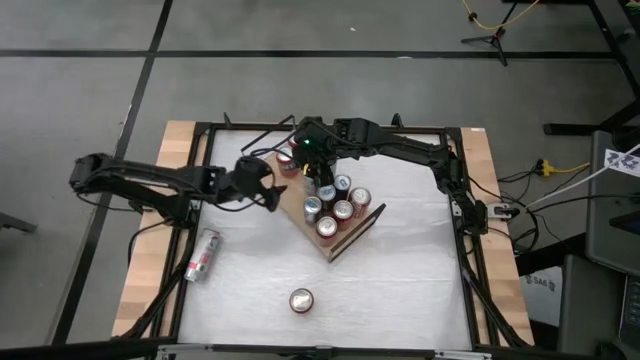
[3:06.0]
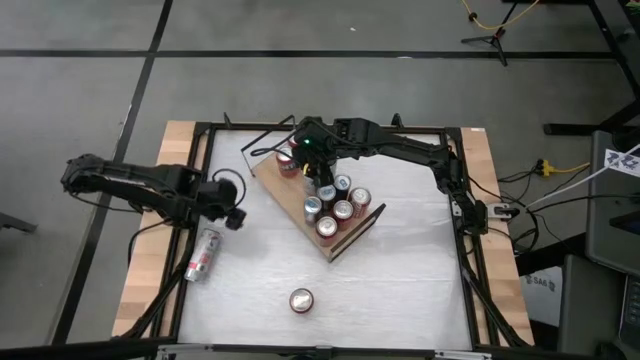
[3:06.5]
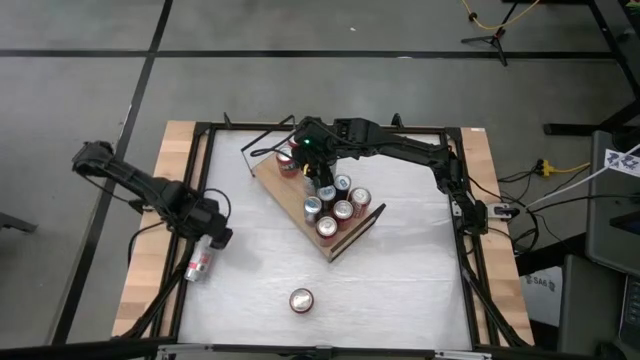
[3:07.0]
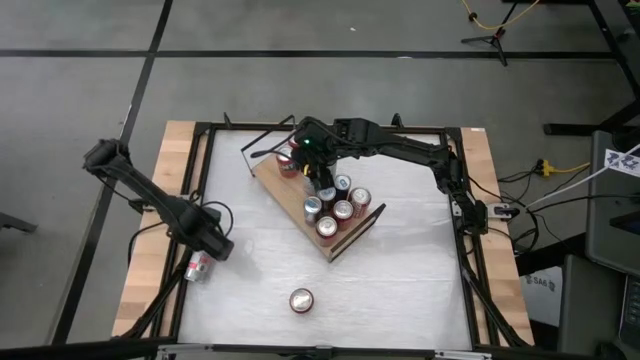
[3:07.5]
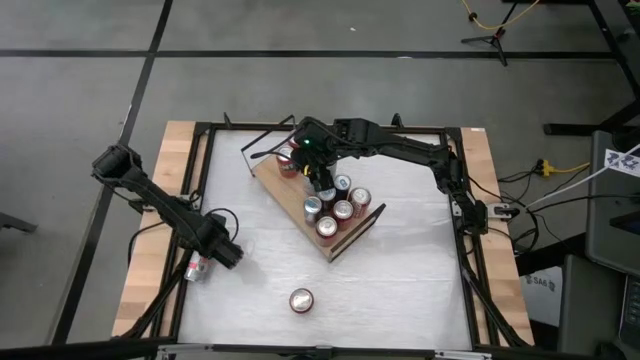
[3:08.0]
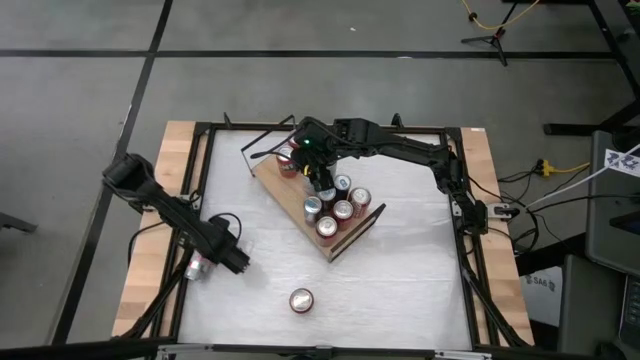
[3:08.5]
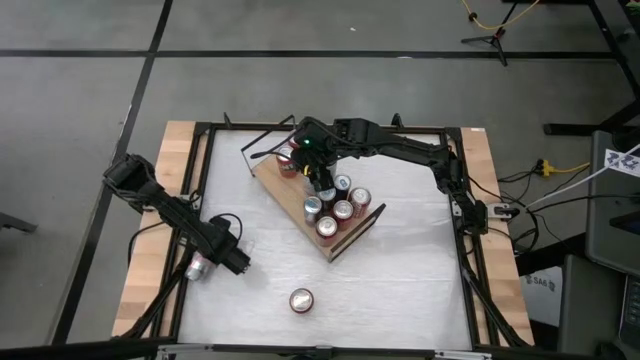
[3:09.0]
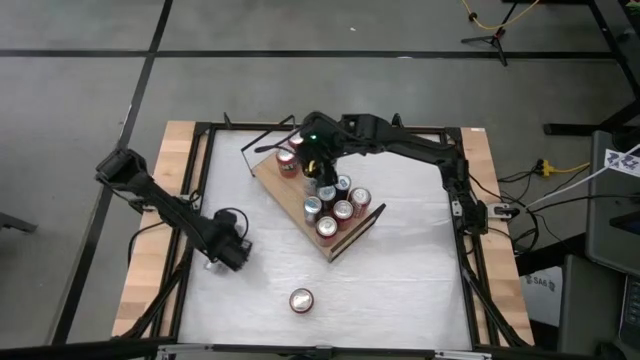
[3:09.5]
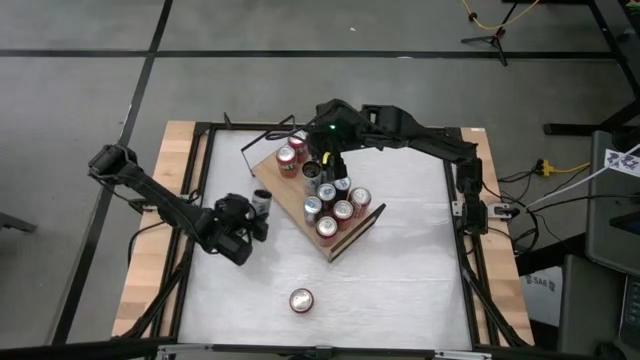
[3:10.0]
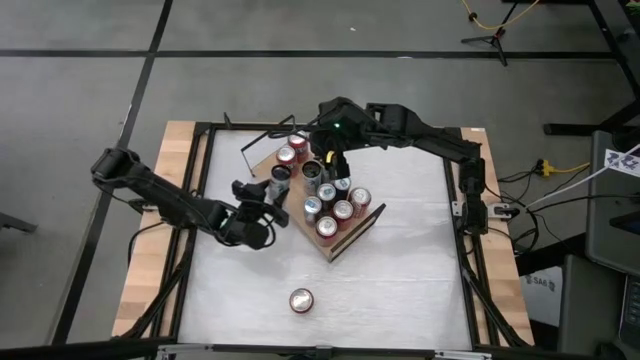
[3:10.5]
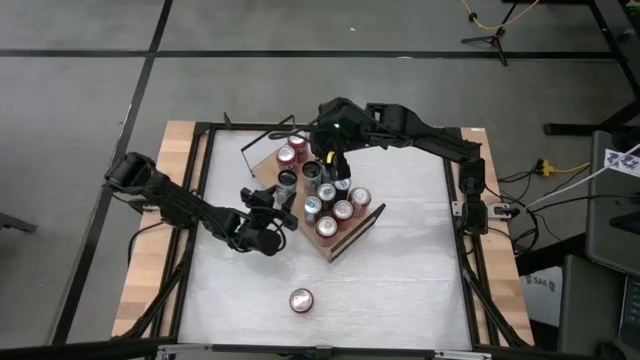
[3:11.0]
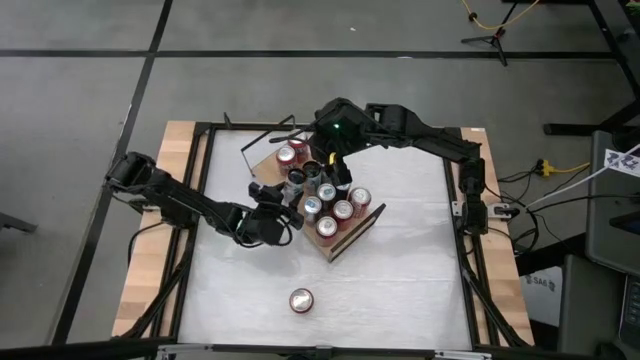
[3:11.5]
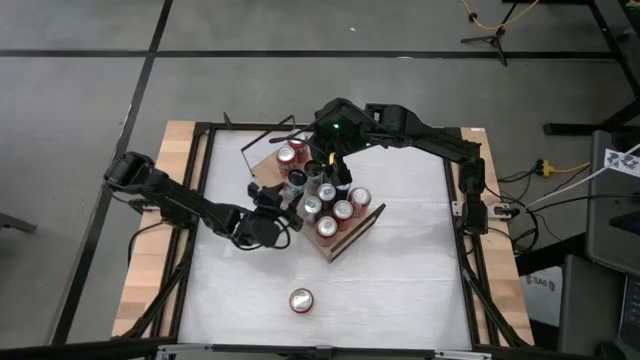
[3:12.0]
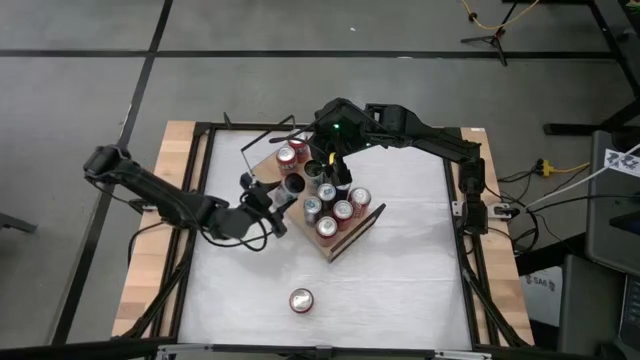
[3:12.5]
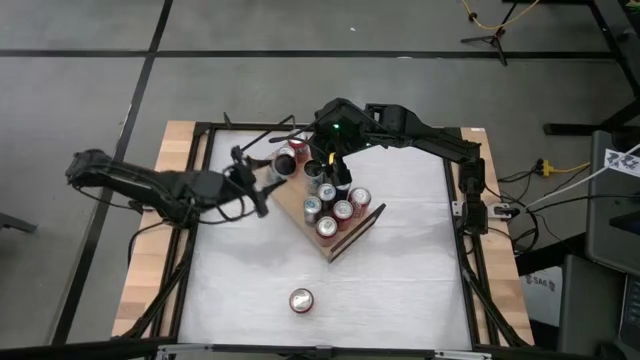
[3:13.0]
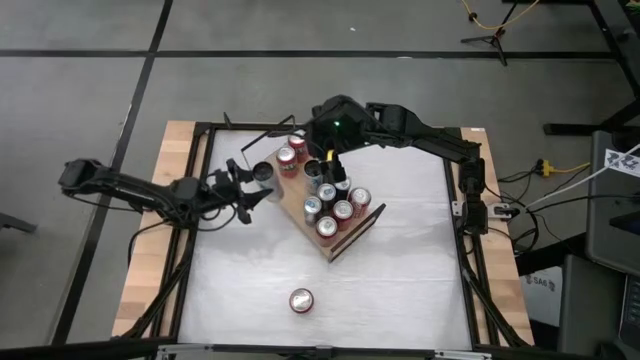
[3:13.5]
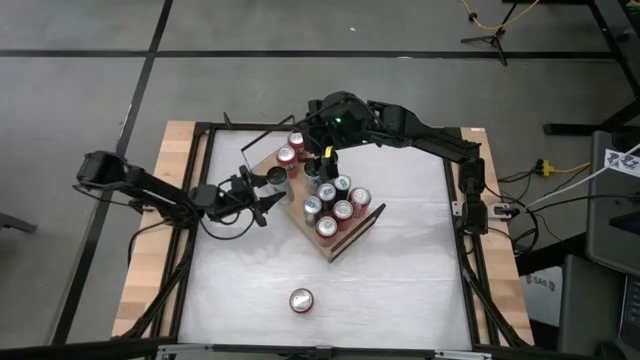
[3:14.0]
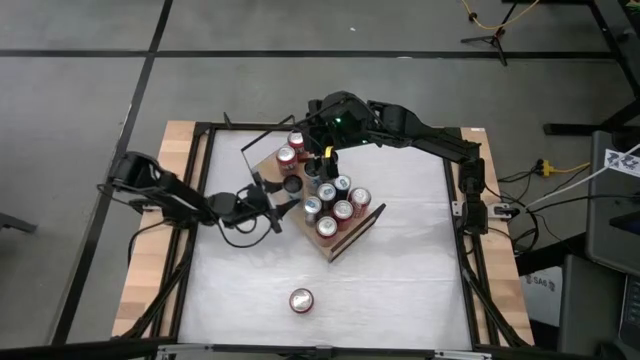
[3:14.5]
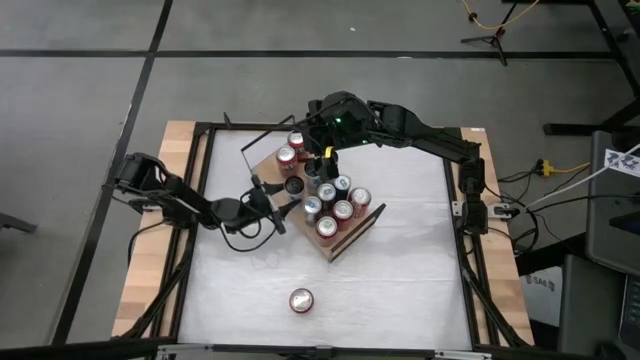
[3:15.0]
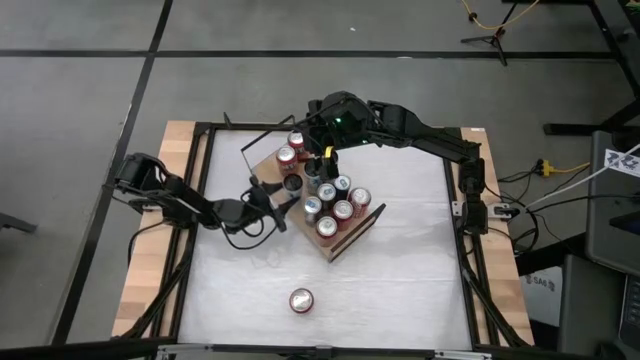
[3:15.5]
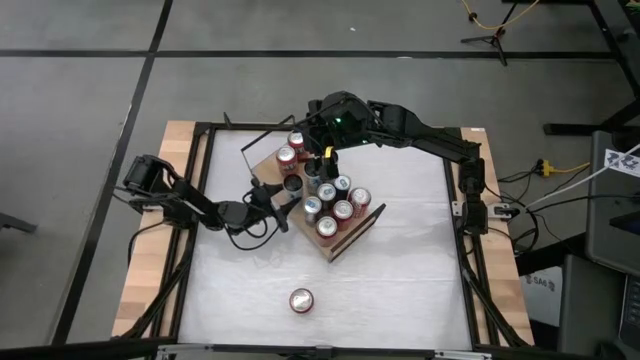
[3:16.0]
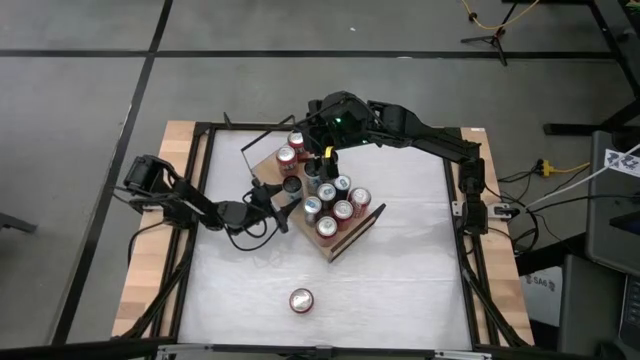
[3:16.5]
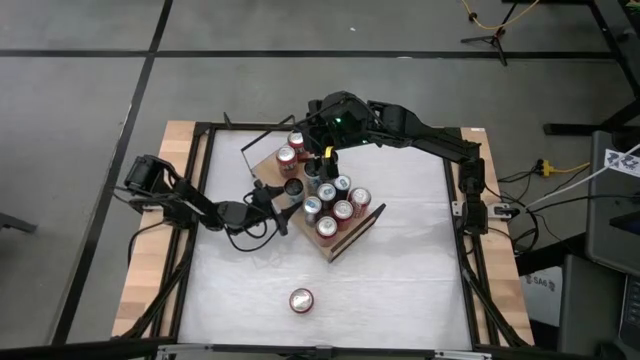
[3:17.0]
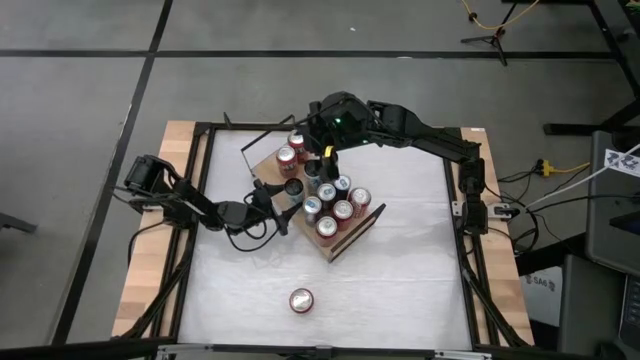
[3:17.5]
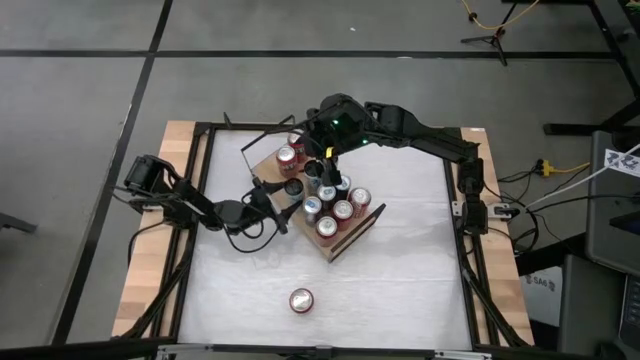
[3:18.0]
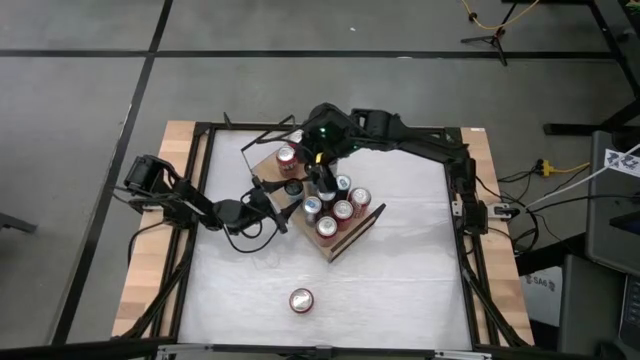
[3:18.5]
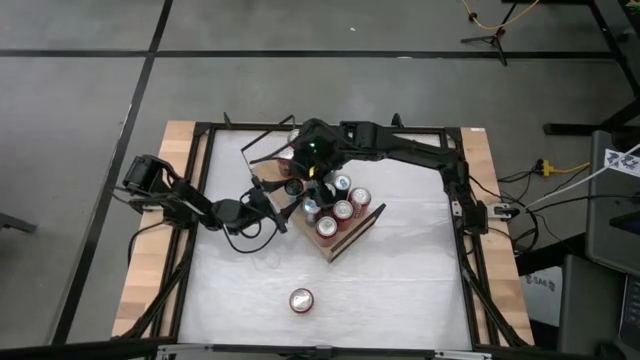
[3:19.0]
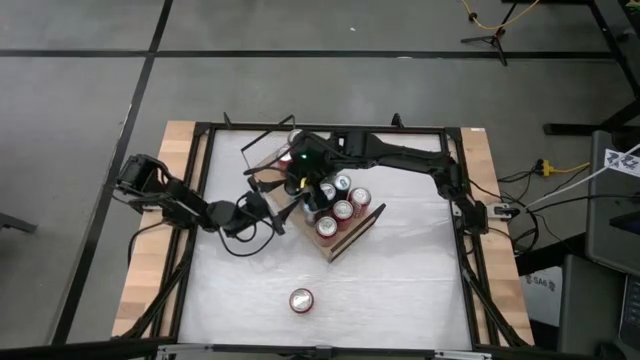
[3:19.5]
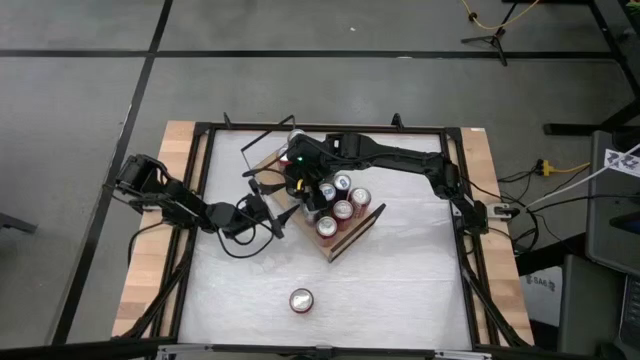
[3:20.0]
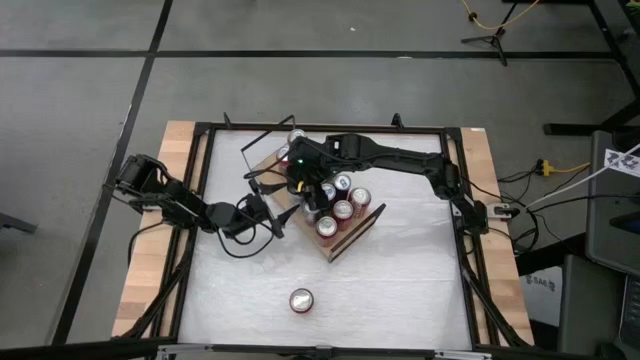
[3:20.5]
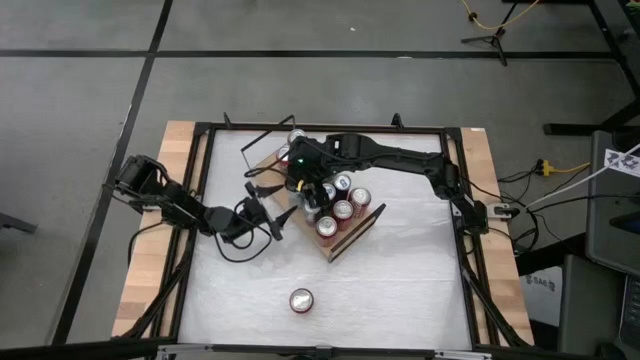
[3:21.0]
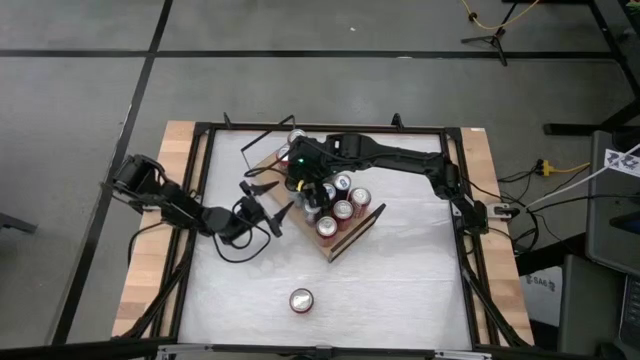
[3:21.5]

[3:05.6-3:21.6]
Task: Place canned beverage on shelf
Put the white pink soda can on the shelf aligned with the other white pink soda cans

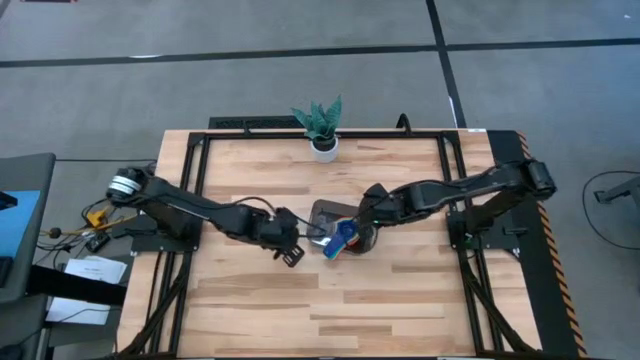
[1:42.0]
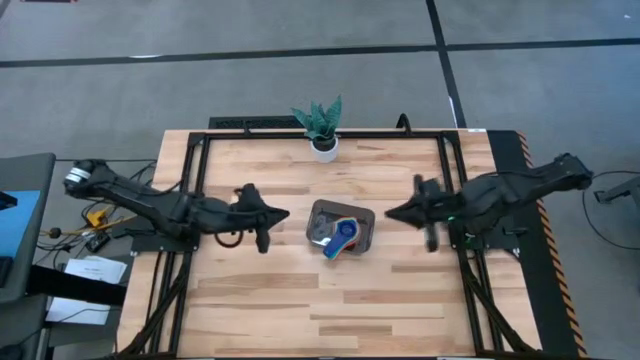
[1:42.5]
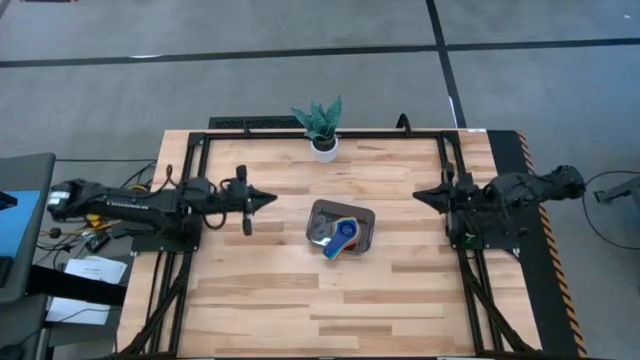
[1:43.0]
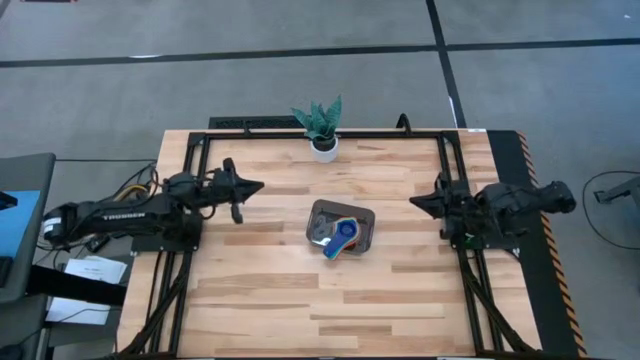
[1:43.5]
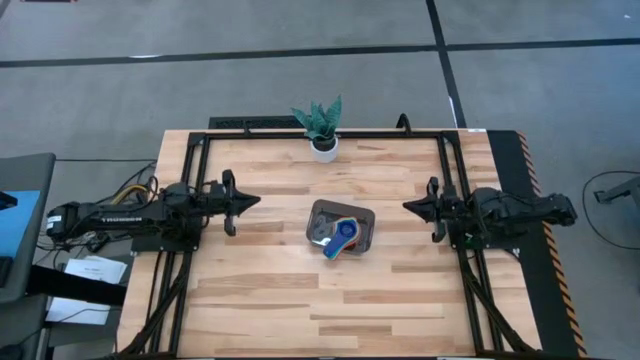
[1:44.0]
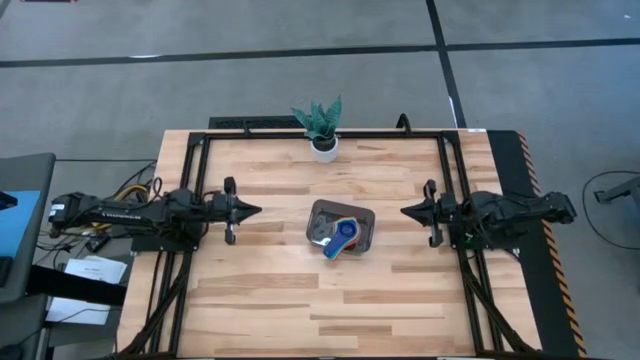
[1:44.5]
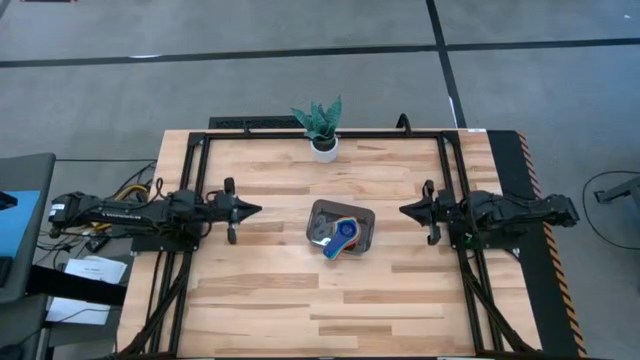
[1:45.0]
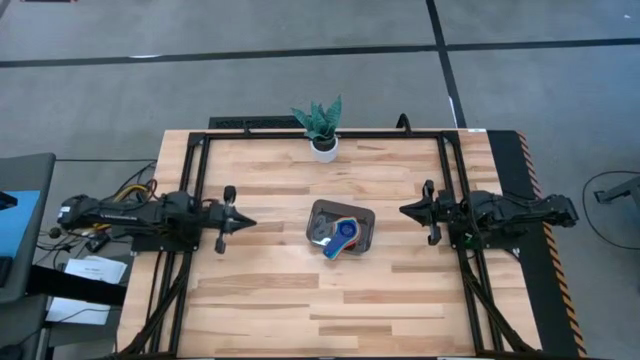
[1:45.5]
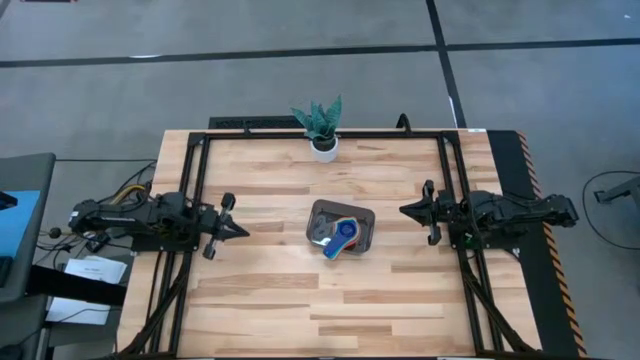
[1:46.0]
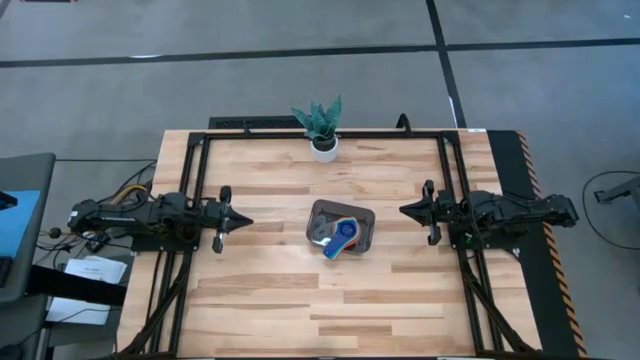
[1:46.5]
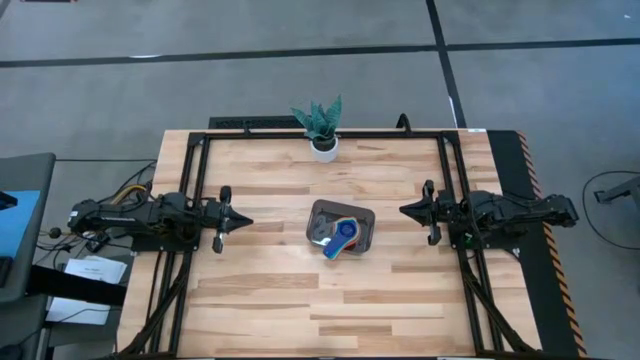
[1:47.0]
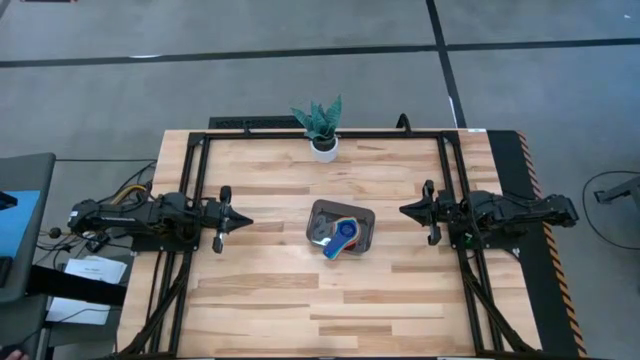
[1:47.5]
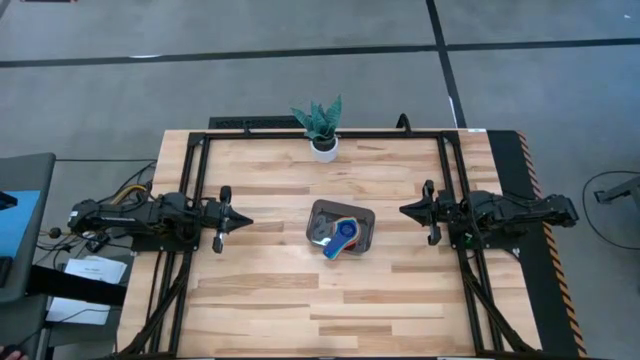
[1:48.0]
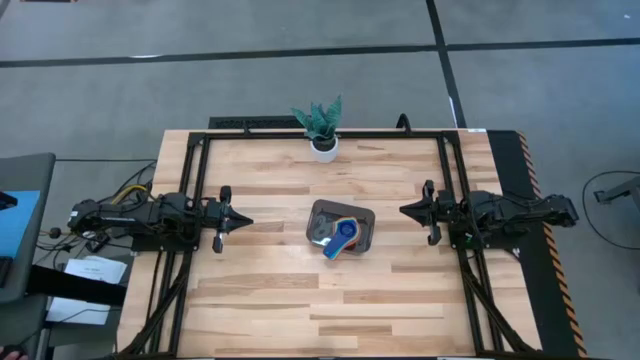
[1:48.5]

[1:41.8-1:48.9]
Task: Nest measuring cups in basket
Return to Home Position
